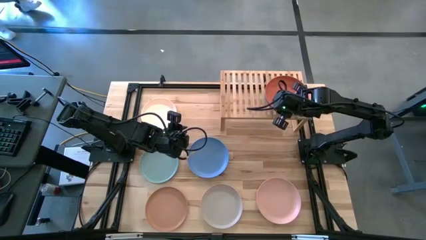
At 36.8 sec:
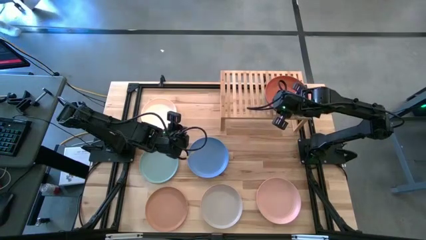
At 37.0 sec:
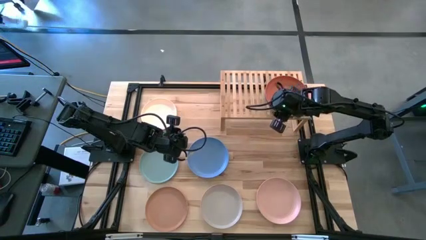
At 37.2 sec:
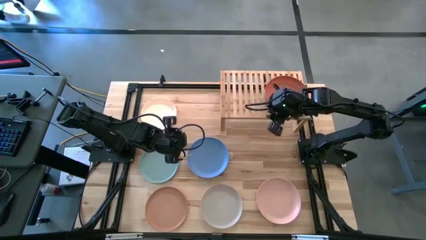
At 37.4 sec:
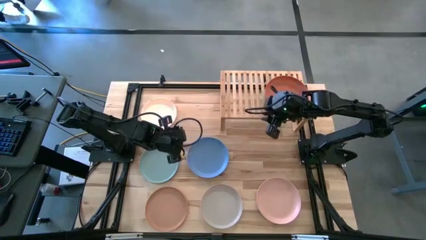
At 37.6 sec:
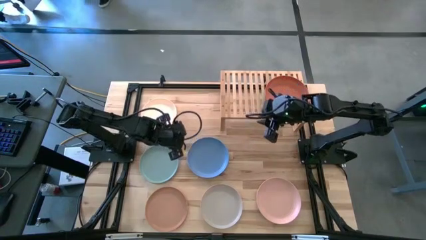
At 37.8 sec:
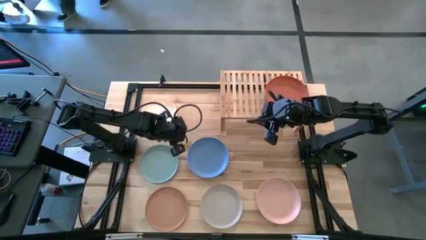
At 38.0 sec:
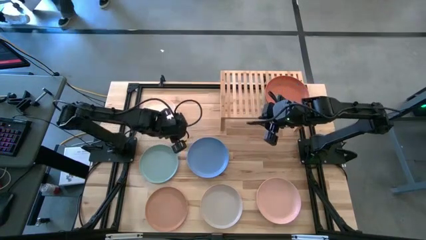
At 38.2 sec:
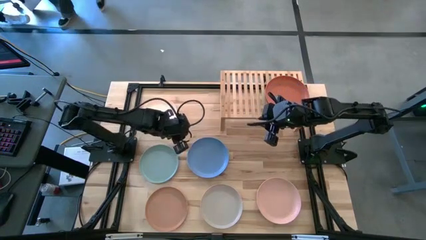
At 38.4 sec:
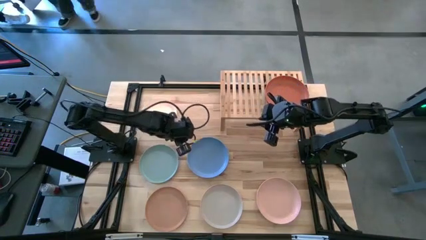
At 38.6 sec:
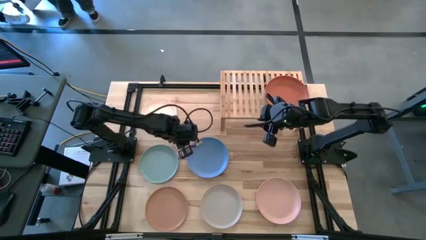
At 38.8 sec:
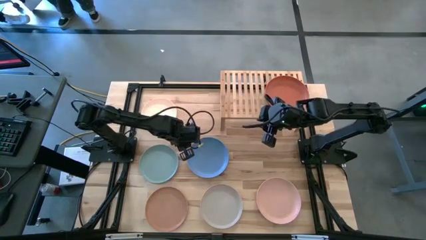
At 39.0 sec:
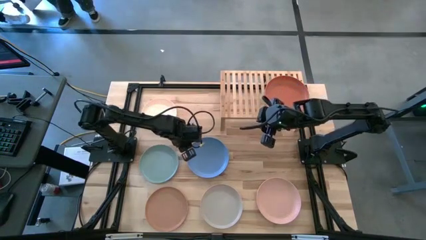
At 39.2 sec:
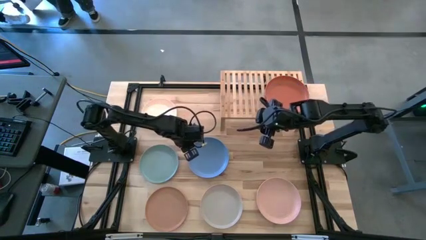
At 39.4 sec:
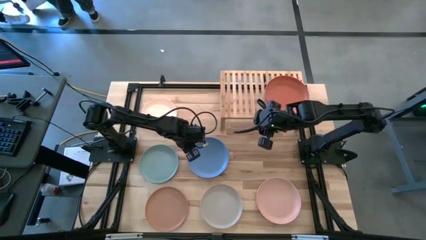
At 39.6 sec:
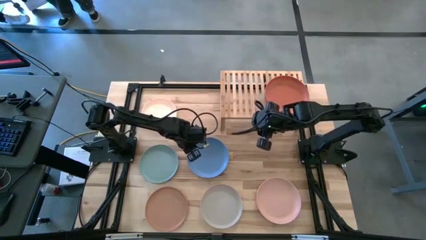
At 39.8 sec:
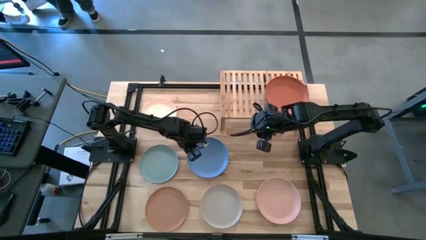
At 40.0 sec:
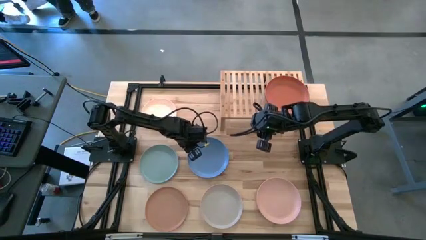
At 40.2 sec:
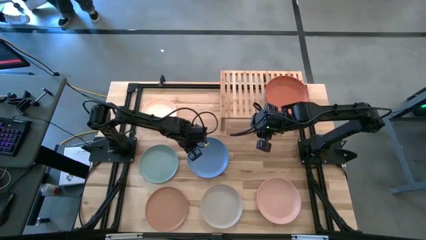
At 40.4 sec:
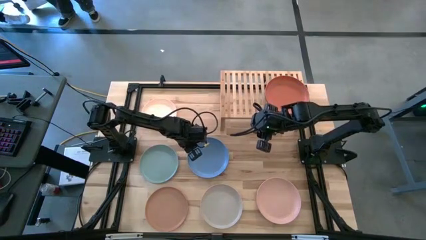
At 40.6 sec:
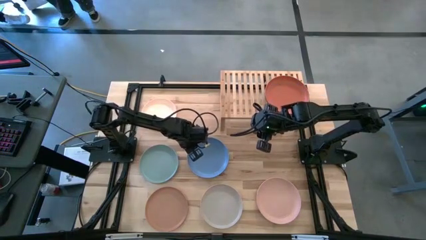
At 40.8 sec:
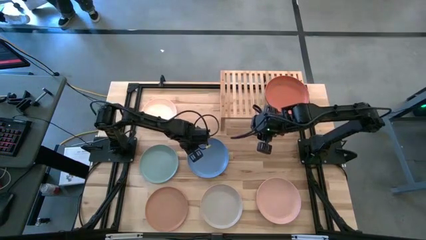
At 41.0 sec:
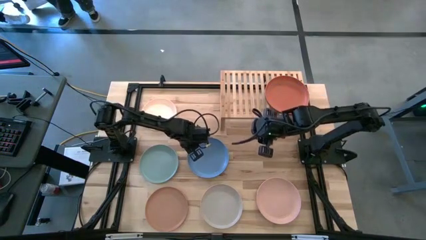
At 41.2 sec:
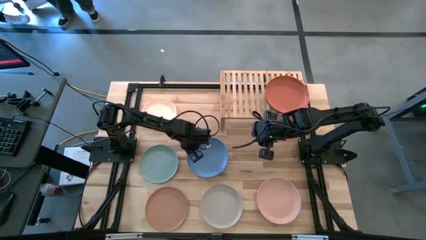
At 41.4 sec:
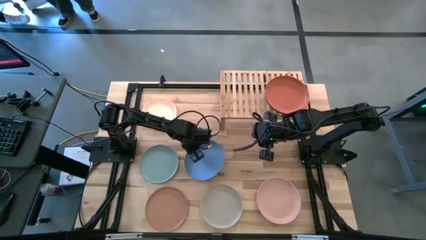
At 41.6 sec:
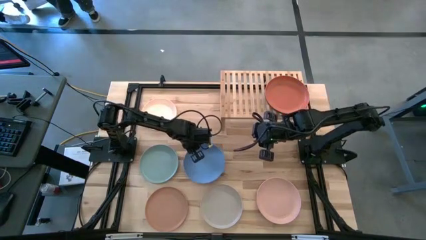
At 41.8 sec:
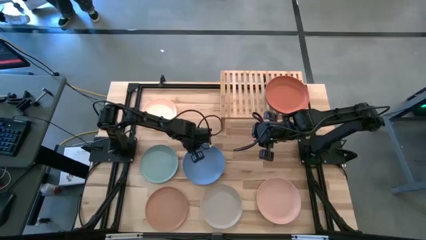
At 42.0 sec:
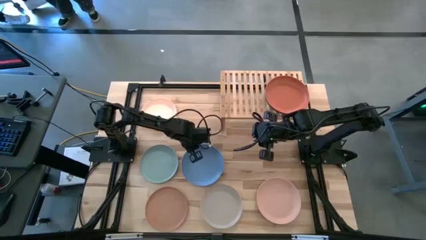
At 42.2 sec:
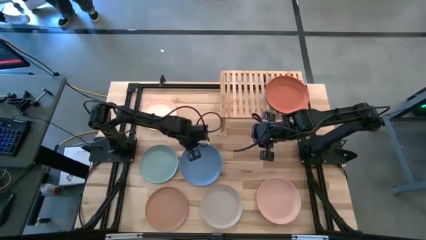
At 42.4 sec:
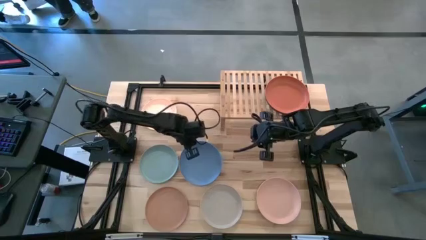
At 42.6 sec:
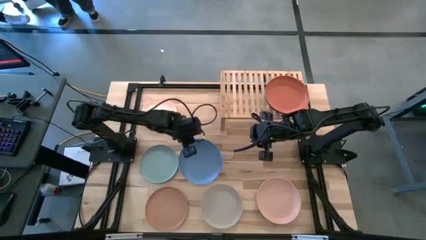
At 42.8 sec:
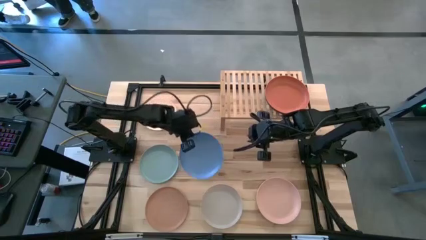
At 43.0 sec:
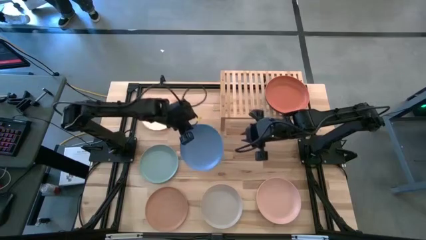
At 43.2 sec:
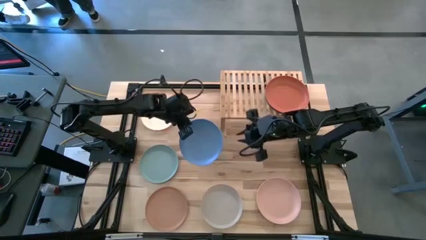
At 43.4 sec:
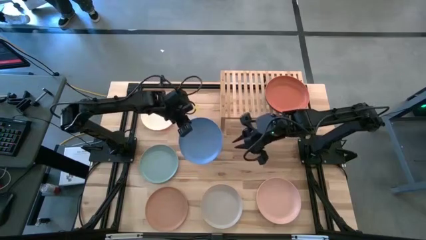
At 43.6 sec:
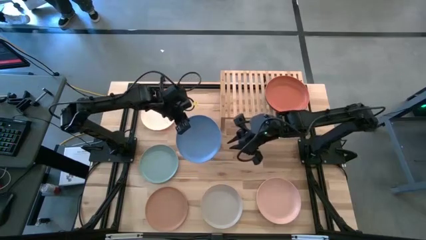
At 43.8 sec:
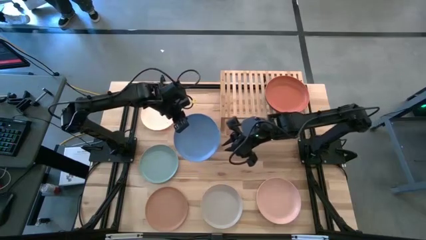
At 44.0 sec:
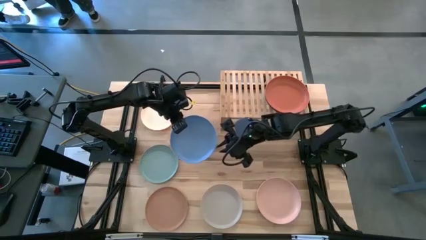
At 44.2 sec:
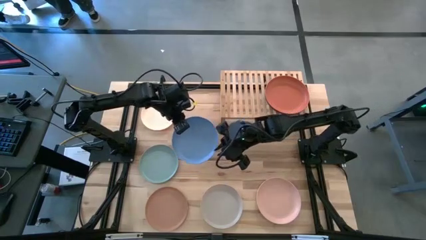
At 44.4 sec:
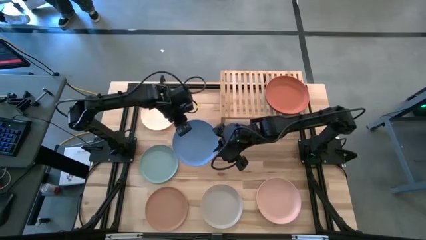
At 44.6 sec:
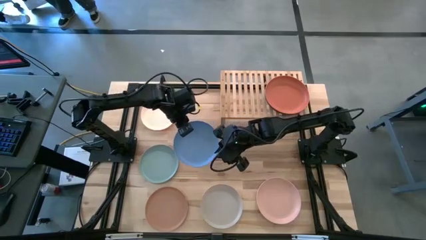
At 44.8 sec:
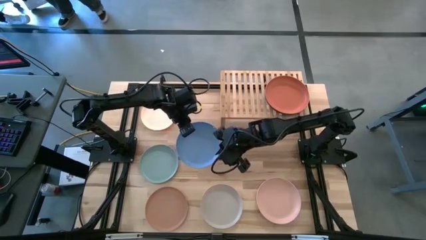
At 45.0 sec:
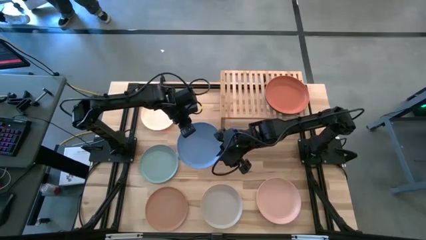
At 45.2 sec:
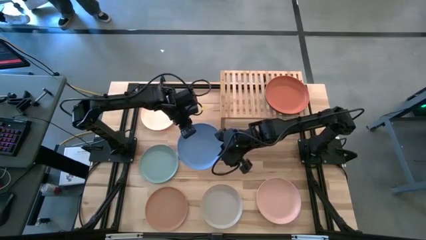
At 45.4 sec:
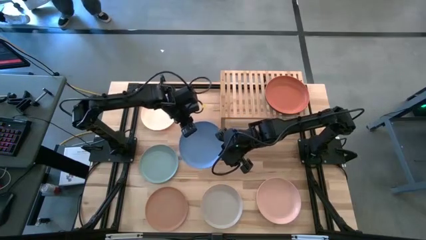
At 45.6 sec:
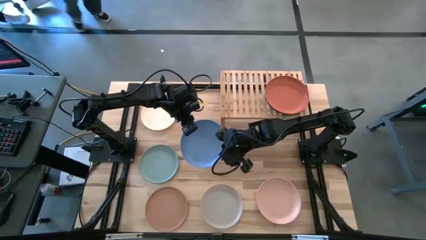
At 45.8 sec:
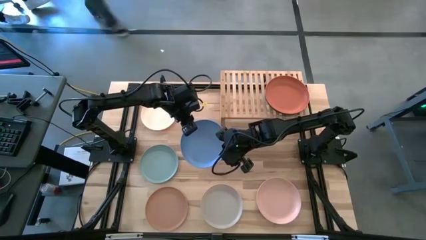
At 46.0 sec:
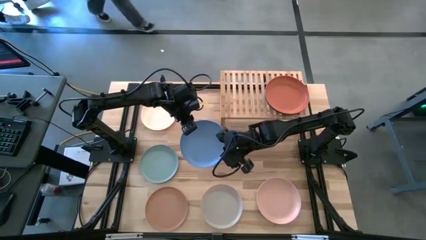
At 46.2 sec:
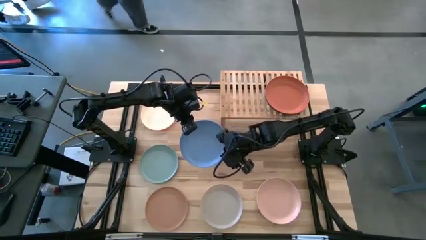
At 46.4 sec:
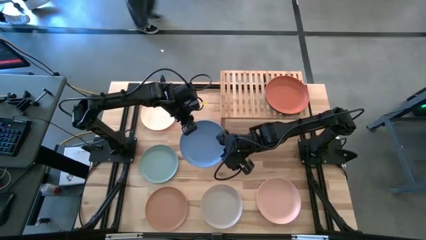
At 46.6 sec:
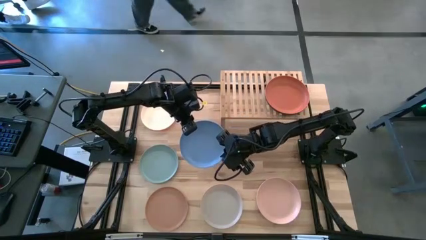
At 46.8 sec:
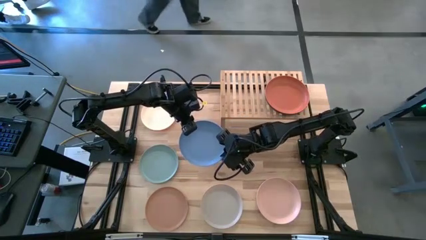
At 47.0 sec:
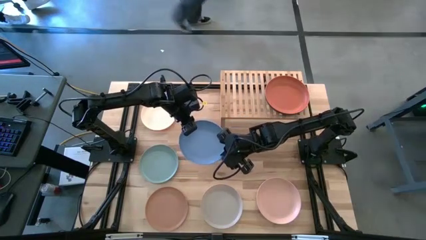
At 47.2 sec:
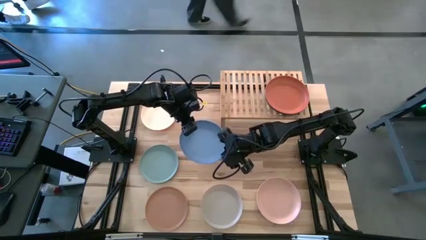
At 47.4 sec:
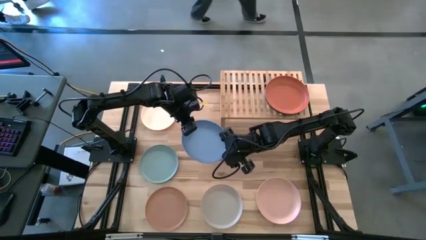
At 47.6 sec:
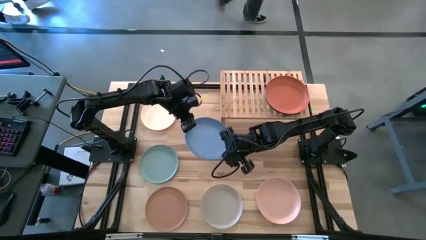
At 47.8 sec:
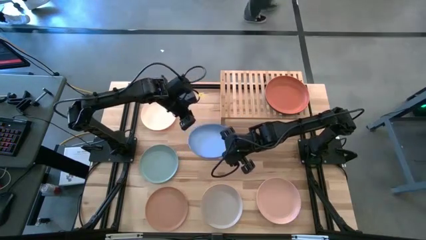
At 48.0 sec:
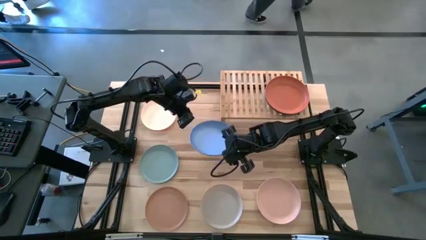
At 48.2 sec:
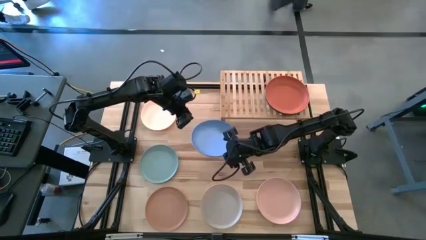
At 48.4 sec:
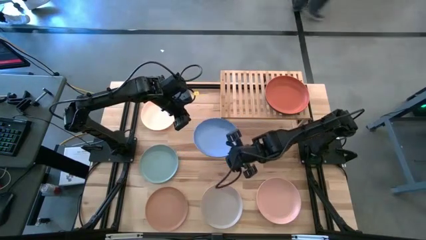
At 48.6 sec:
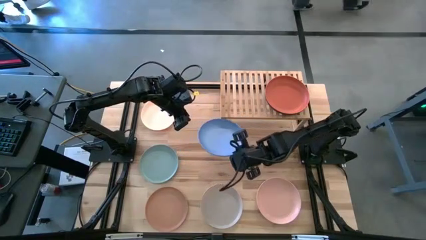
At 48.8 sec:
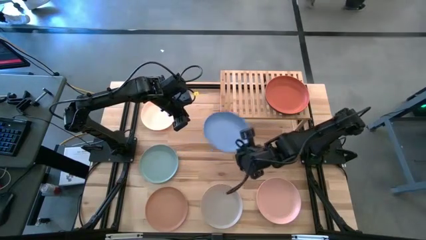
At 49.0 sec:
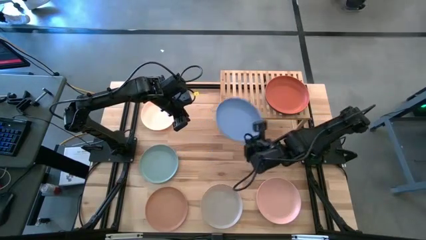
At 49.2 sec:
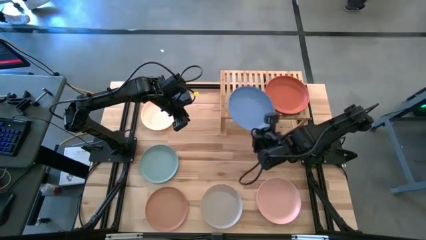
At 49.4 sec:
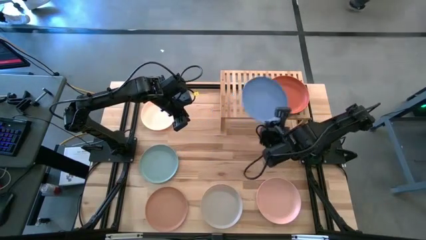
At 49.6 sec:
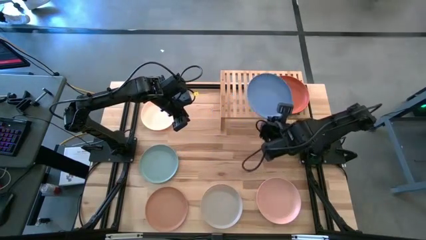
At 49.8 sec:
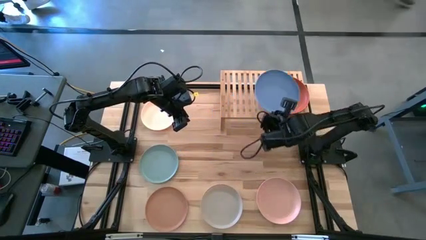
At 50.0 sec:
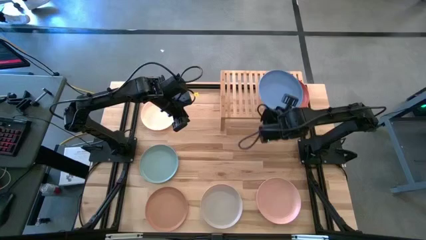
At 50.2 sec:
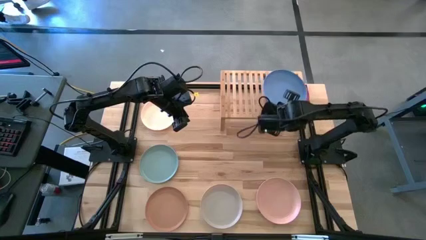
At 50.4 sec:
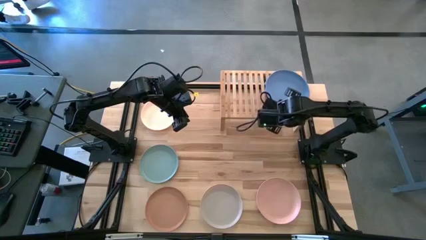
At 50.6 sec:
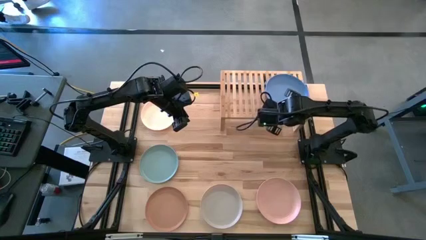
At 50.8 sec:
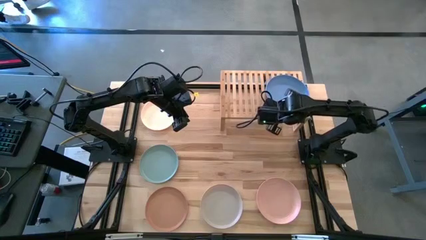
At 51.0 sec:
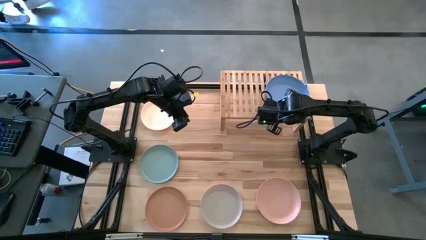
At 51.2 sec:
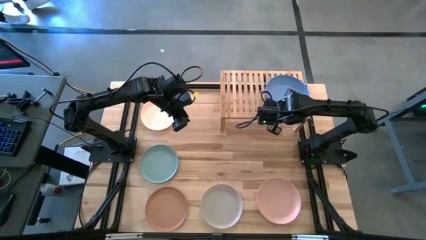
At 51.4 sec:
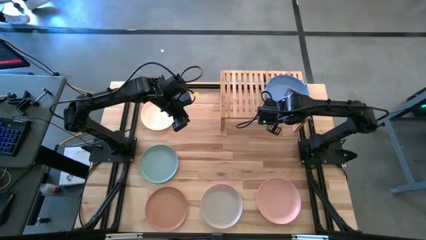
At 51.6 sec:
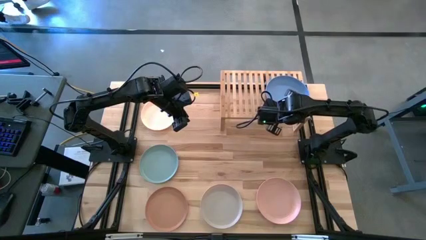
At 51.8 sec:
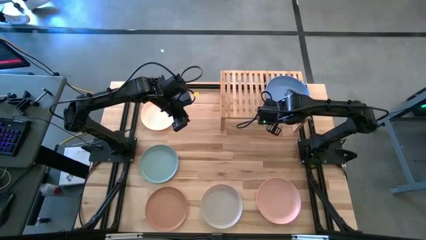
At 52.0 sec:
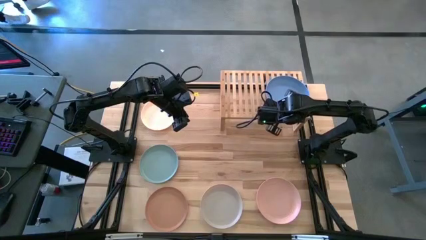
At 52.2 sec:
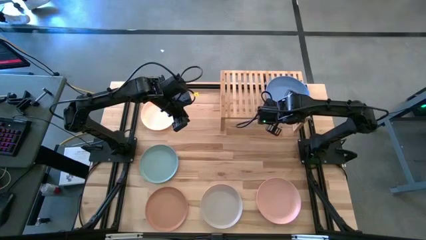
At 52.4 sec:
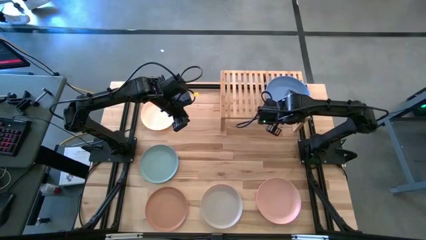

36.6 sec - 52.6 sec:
Task: Place and stack plates onto a shelf
Stack the blue plate on top of the orange plate on the shelf
